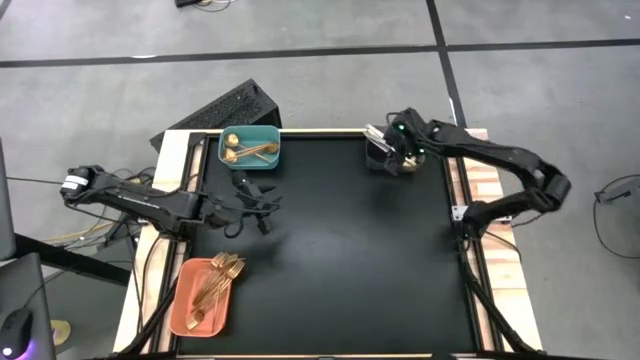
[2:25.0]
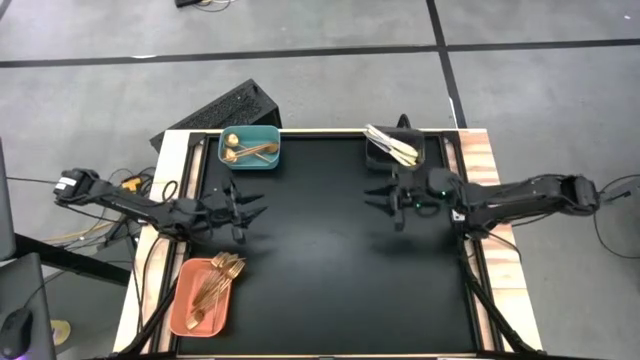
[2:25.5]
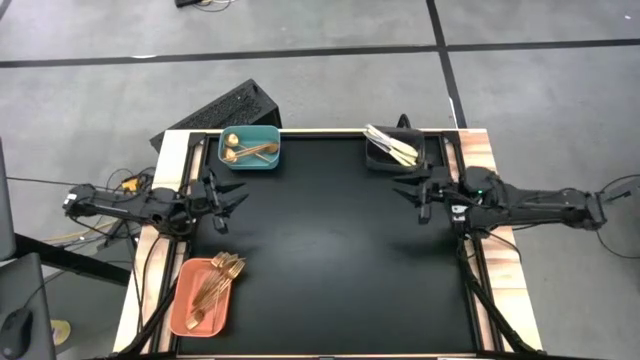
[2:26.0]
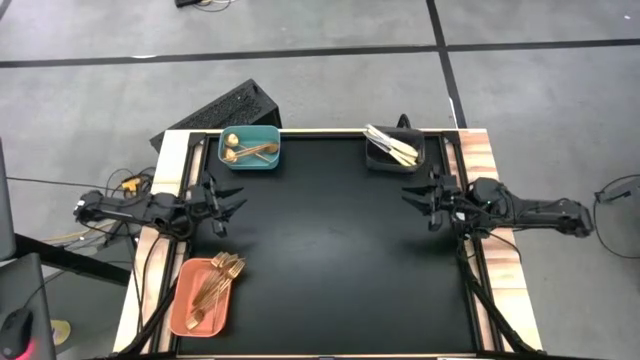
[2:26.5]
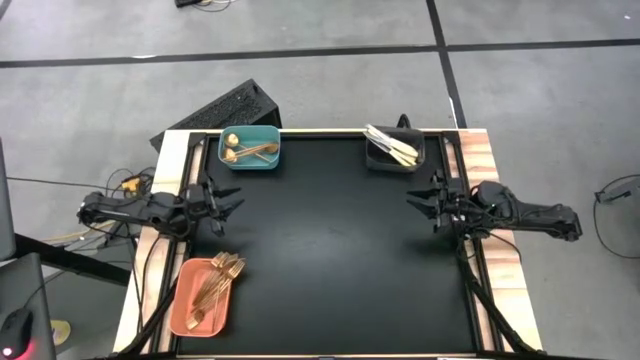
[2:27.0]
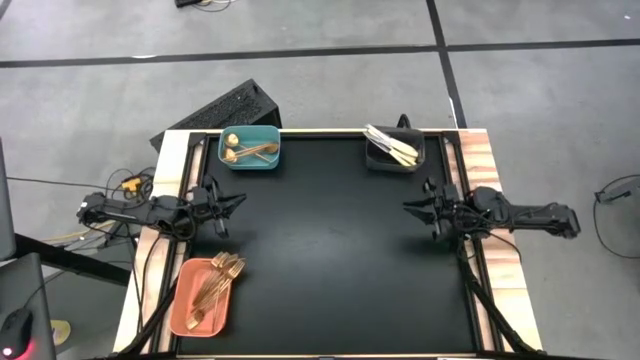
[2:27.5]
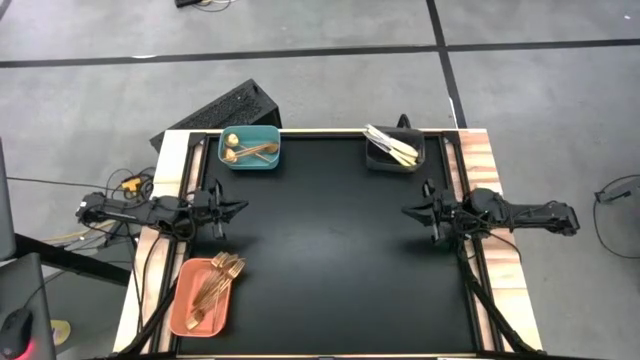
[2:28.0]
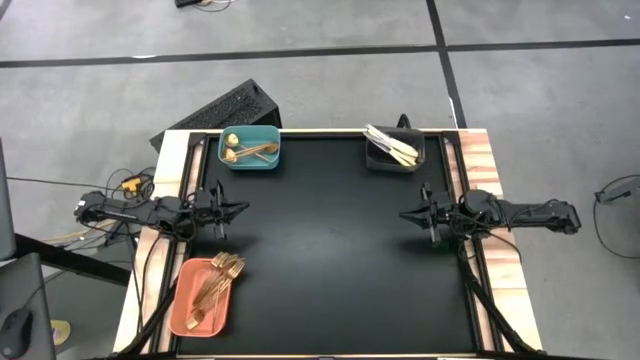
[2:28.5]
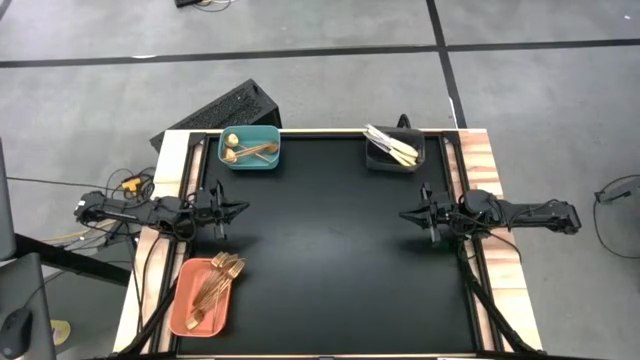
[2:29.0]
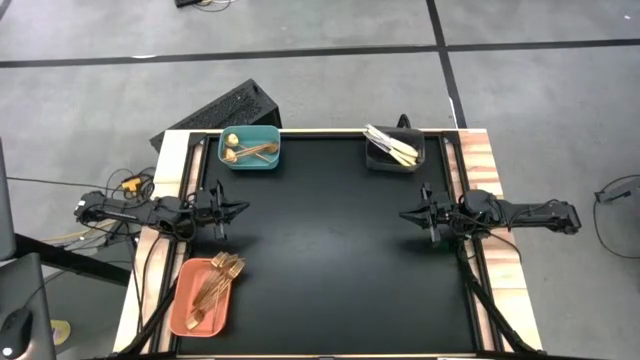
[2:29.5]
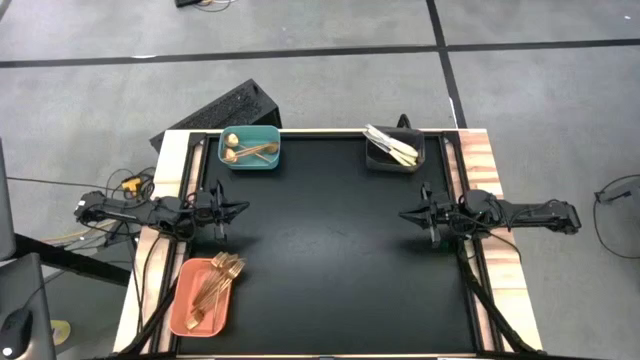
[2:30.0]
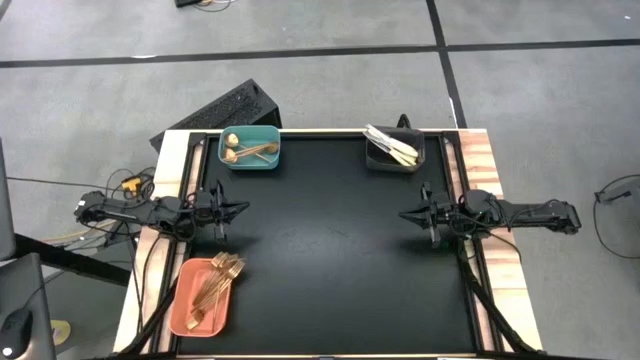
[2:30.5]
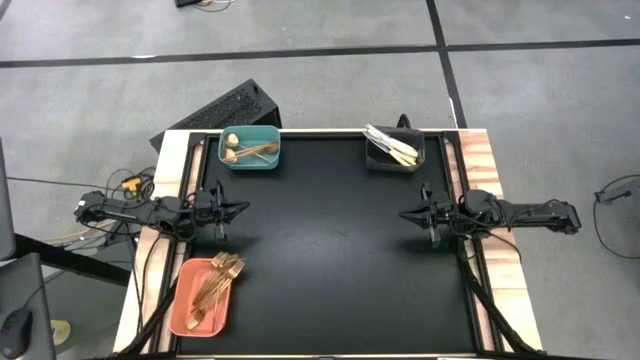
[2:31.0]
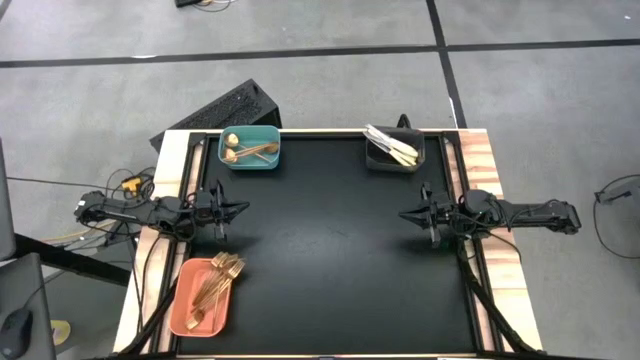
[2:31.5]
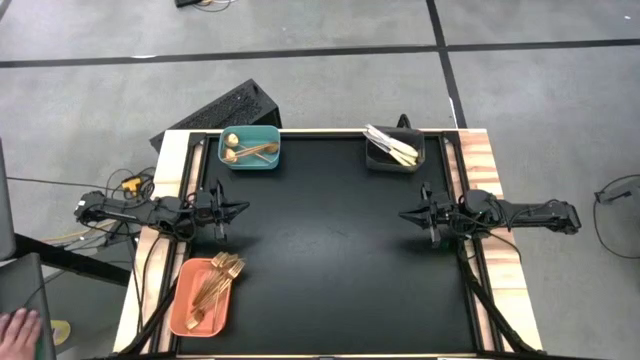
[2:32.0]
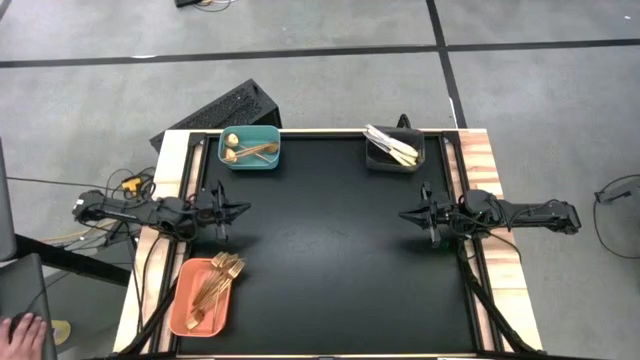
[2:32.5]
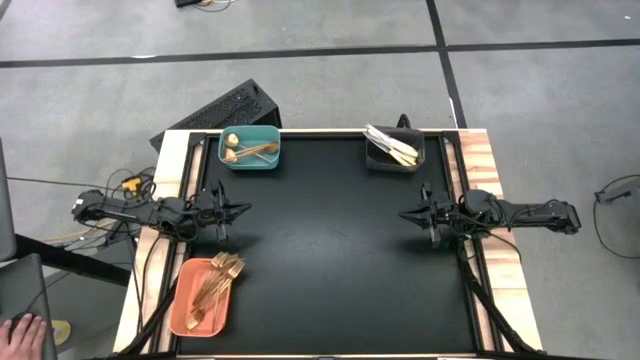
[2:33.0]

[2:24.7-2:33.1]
Task: Sort silverware by color (type)
Return to Home Position

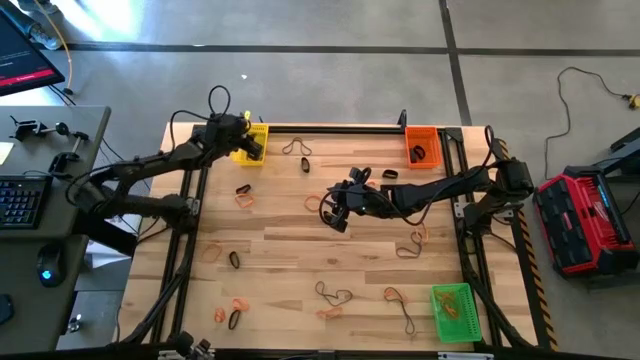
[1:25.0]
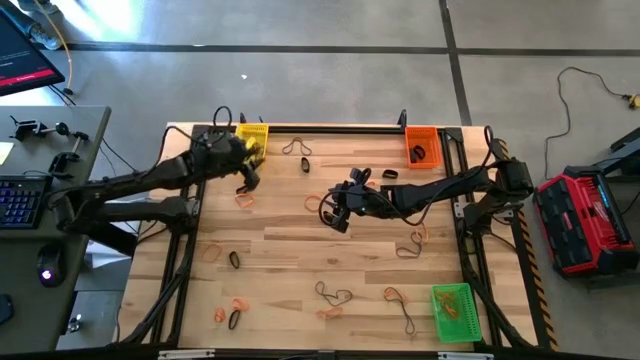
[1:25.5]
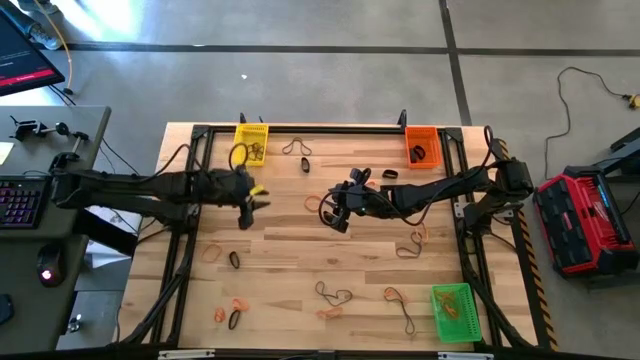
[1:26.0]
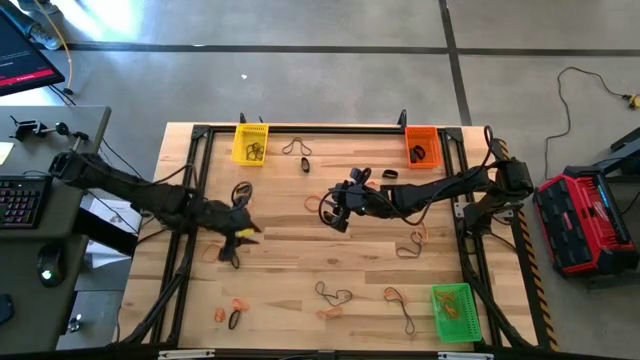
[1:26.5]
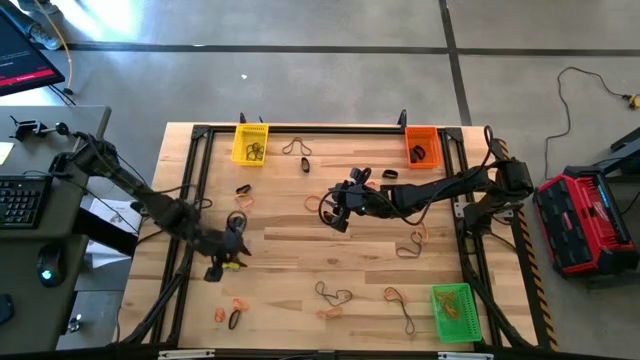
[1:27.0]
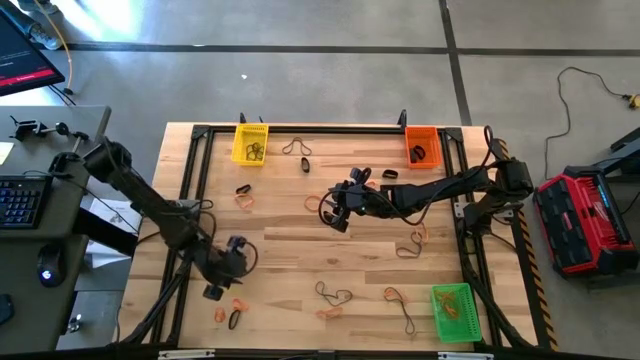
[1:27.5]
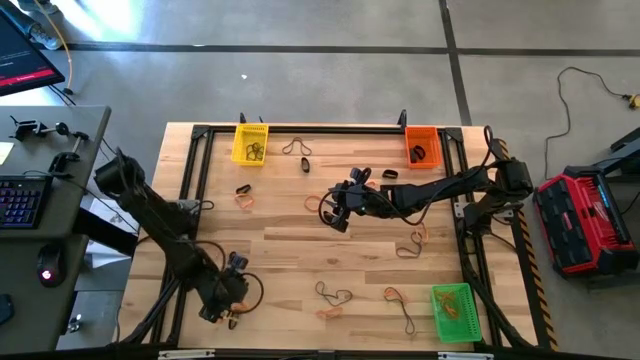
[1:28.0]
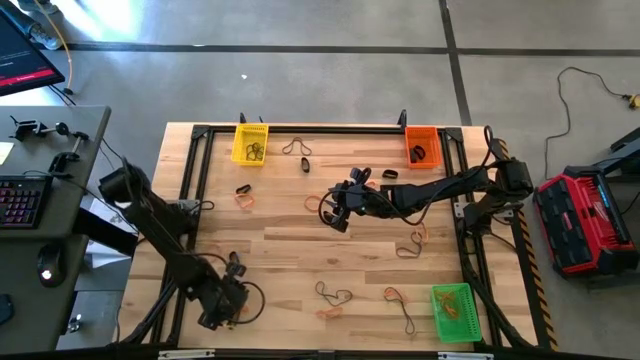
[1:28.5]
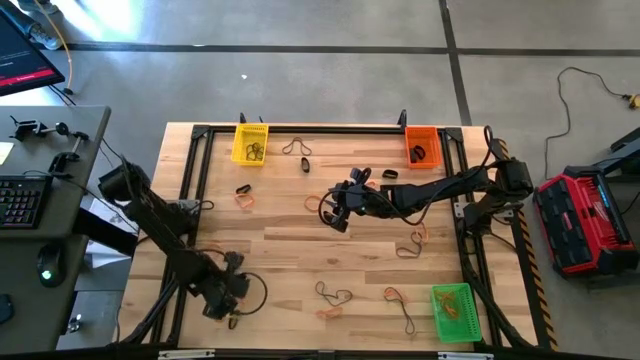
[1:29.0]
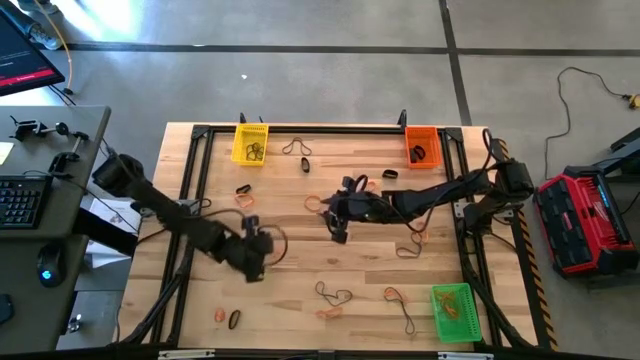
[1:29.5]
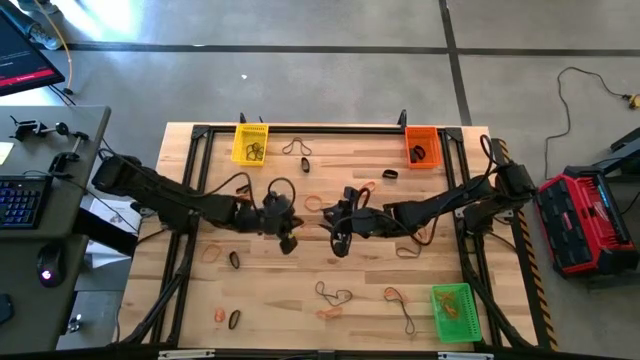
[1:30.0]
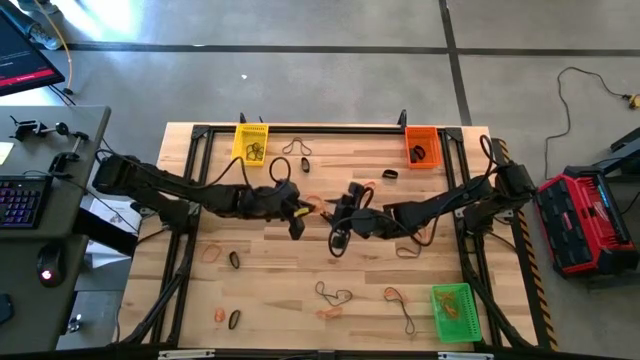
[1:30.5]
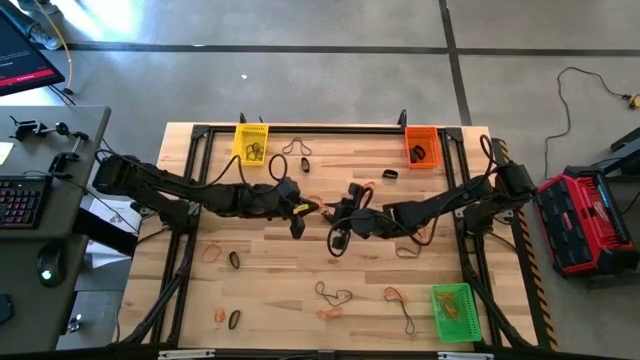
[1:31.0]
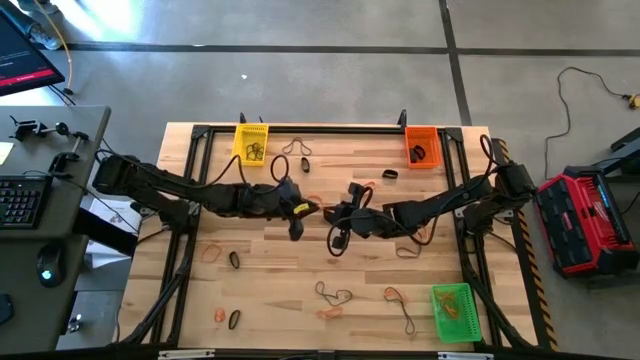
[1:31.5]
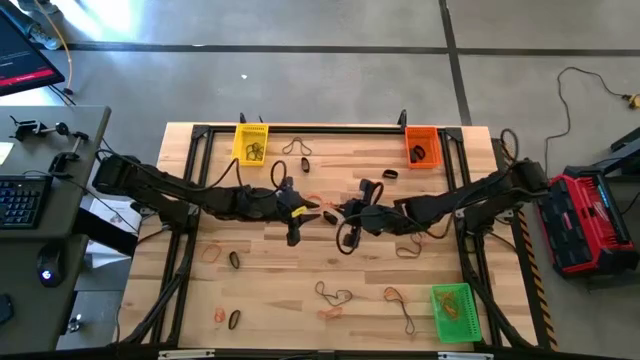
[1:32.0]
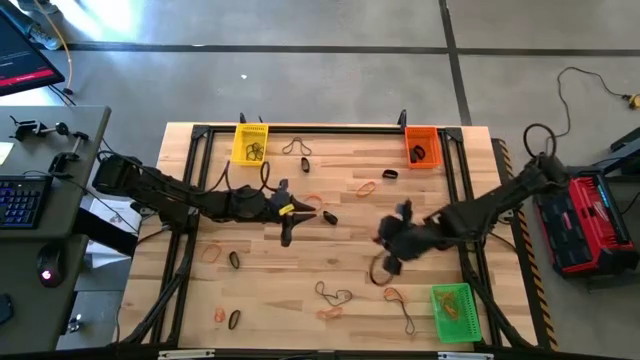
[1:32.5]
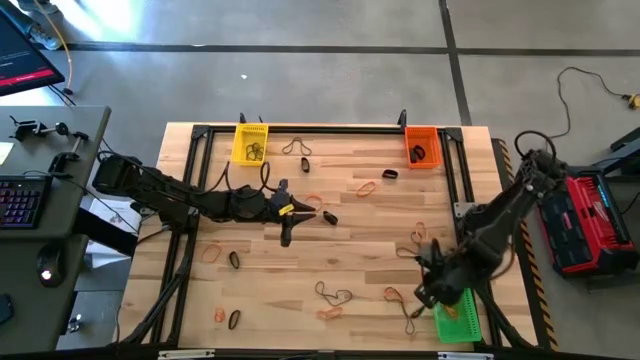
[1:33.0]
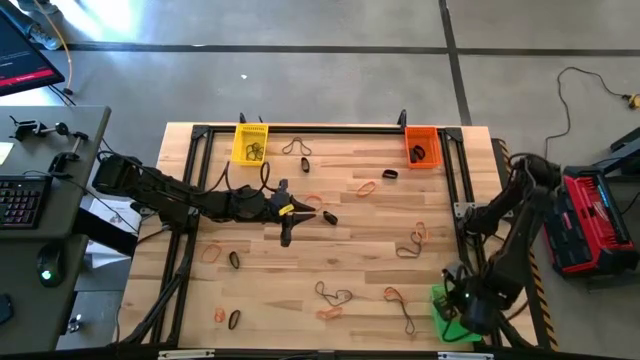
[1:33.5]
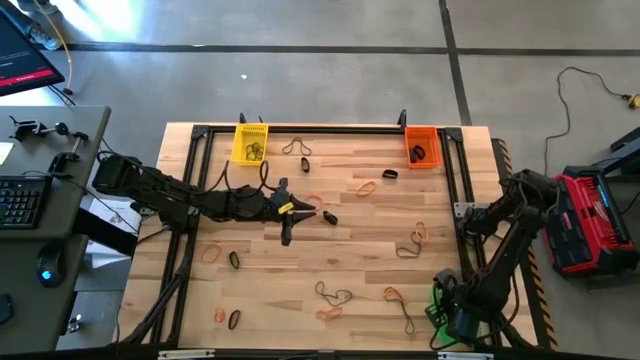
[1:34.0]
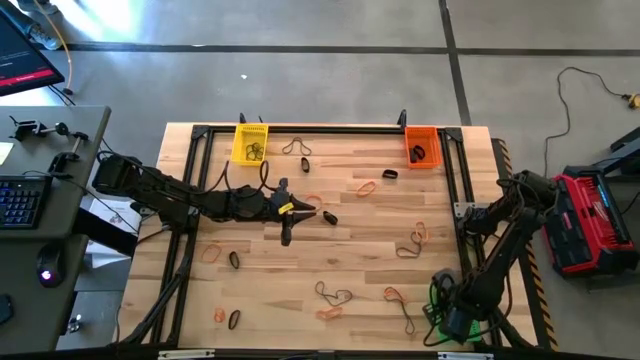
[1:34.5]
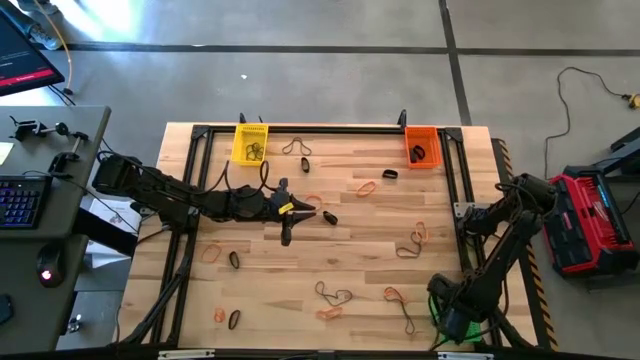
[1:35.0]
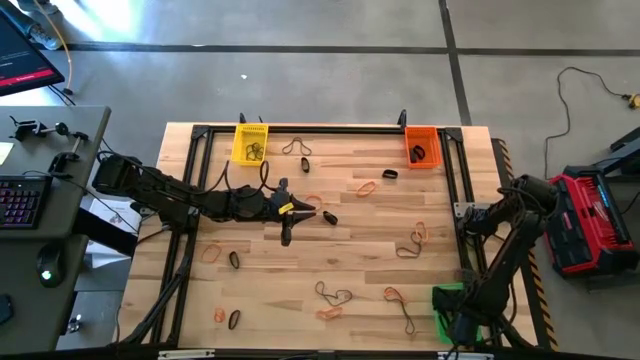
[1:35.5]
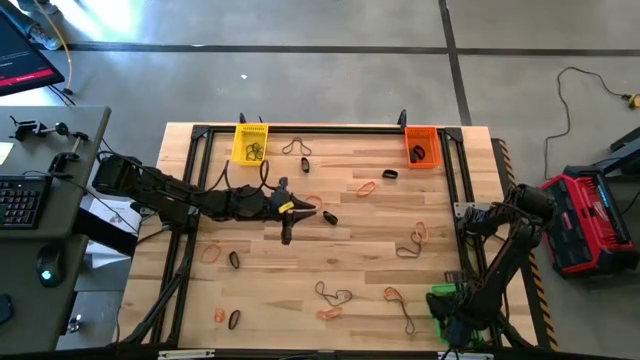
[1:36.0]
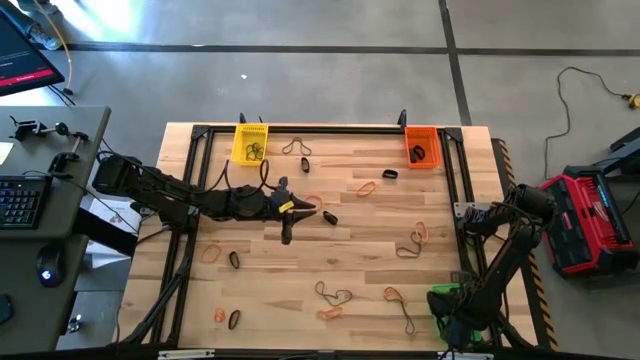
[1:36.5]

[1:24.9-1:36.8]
Task: Sort rubber bands into baskets
Put the orange rubber band into the green bin
